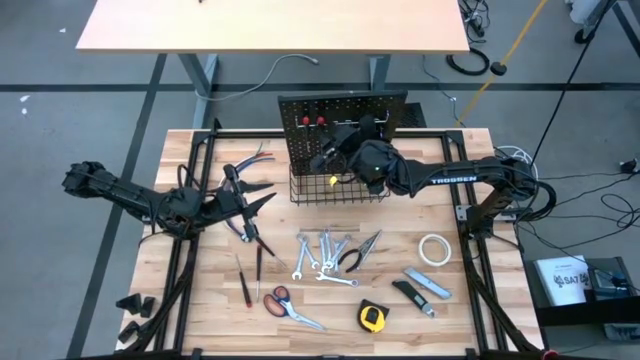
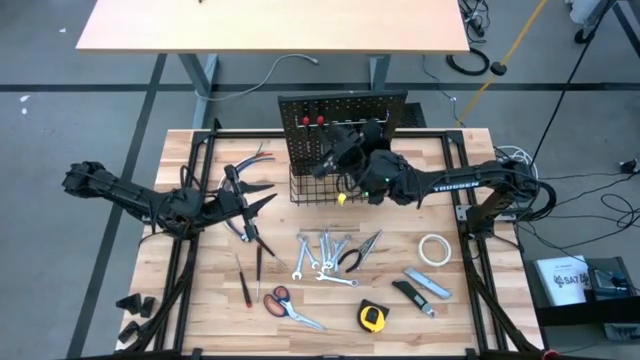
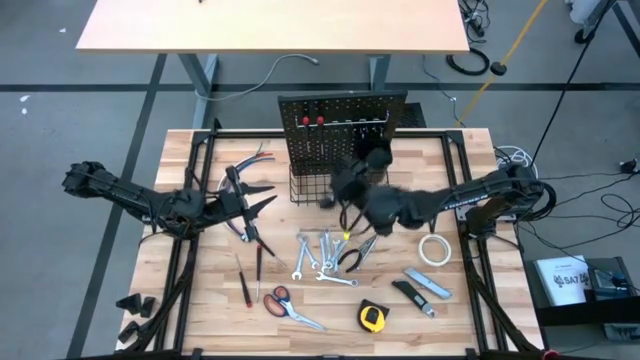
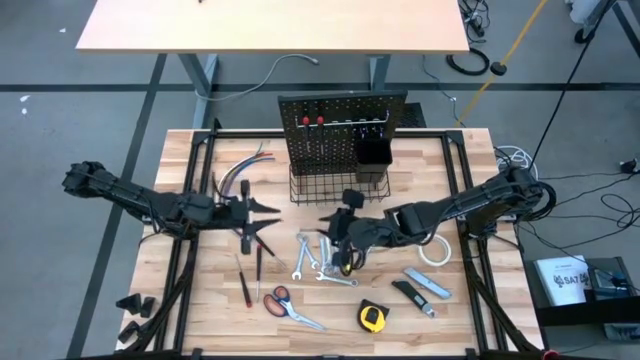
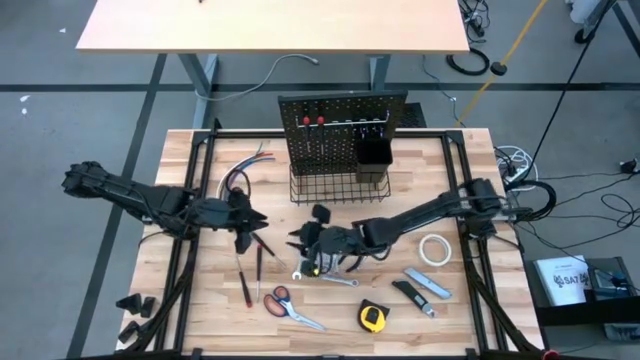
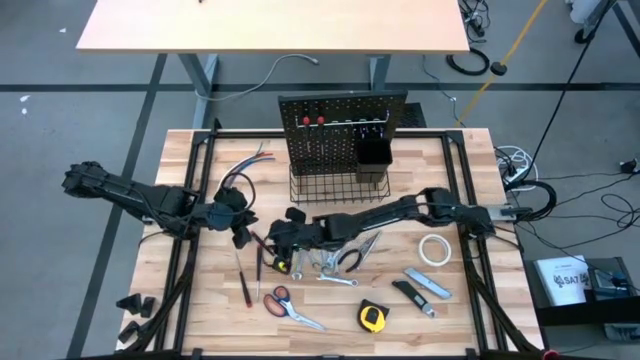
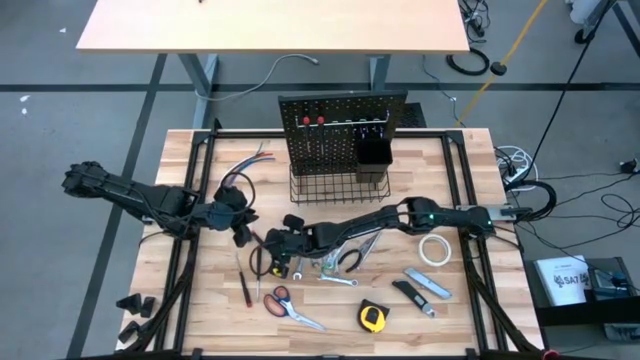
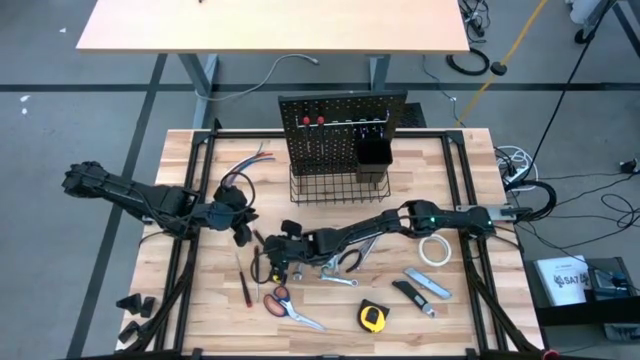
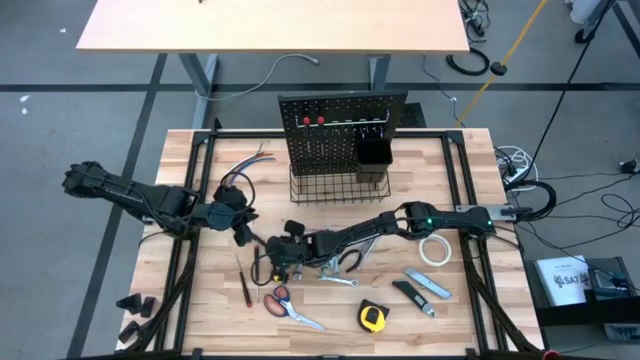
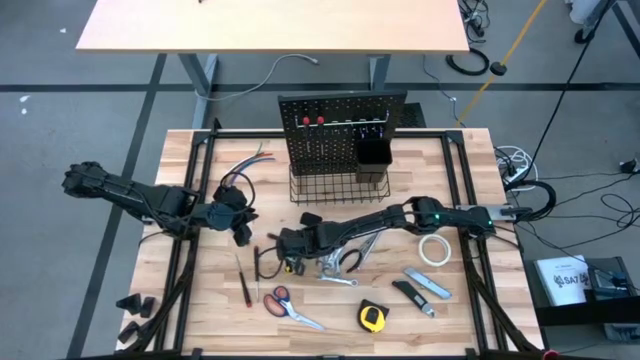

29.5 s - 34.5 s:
Task: Hang tools onto peg board
Hang the nut driver on the pegboard

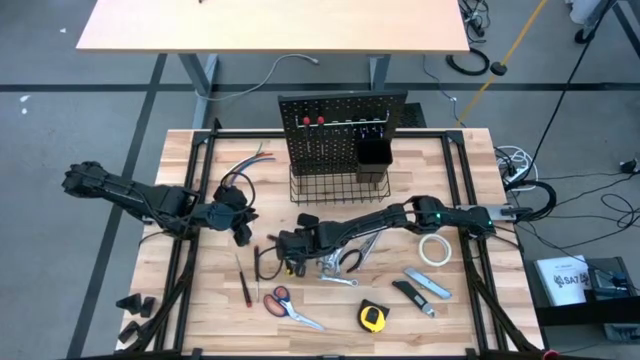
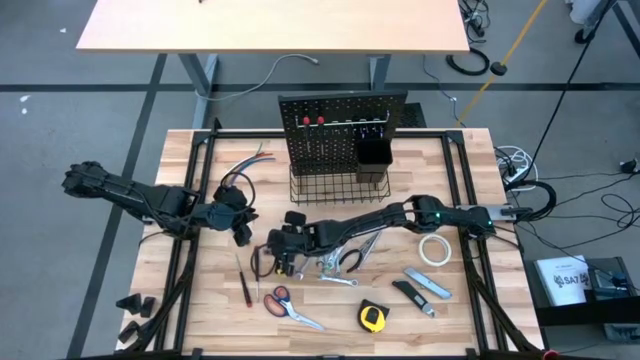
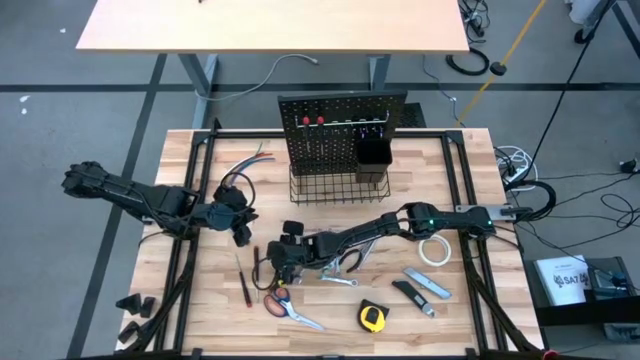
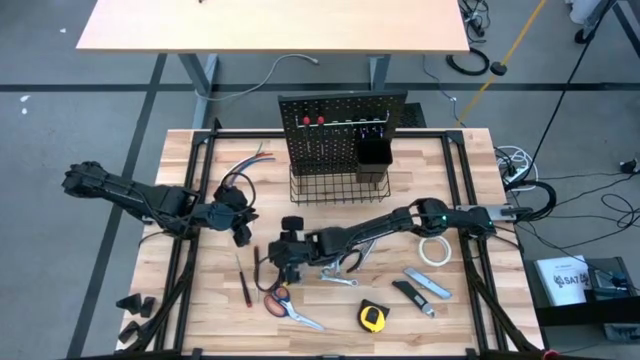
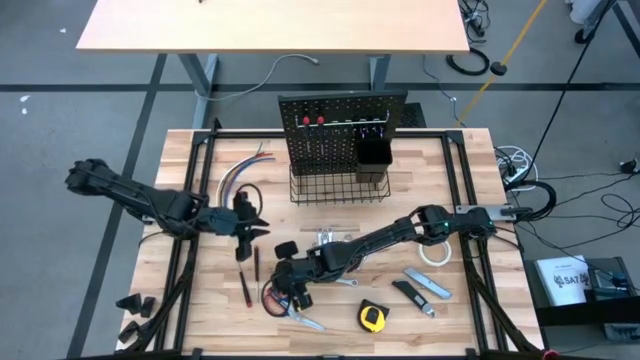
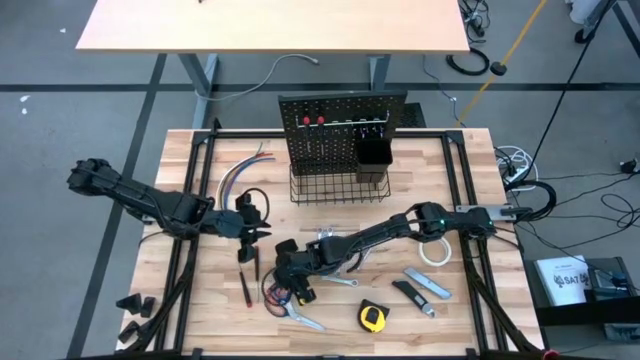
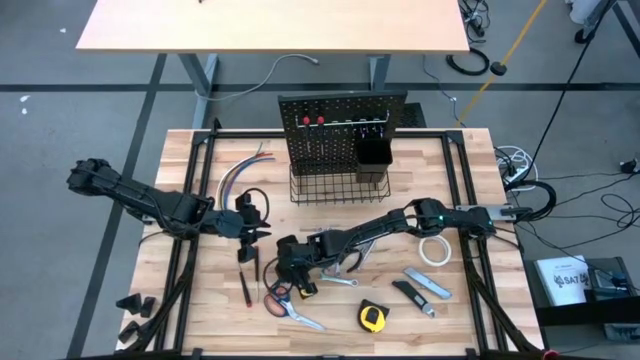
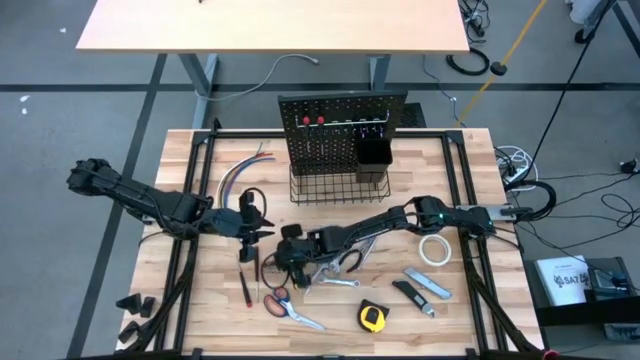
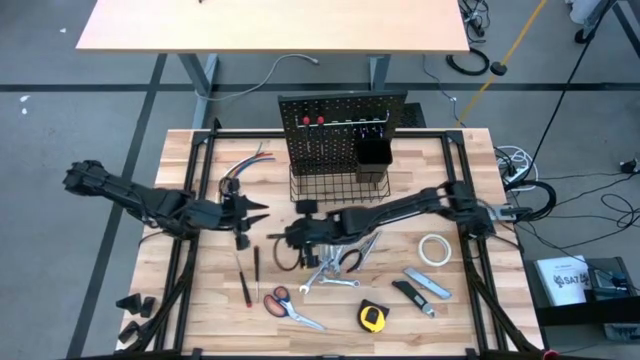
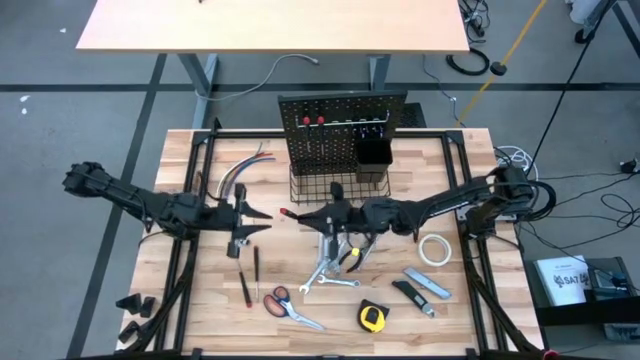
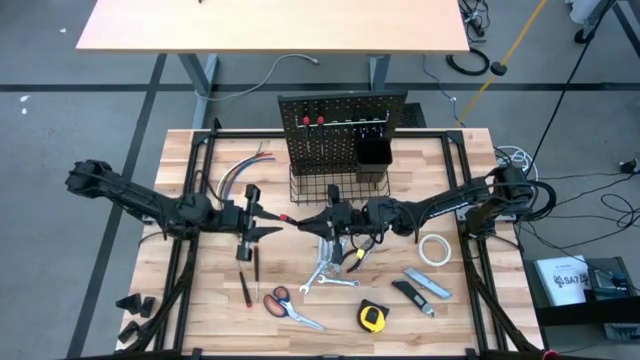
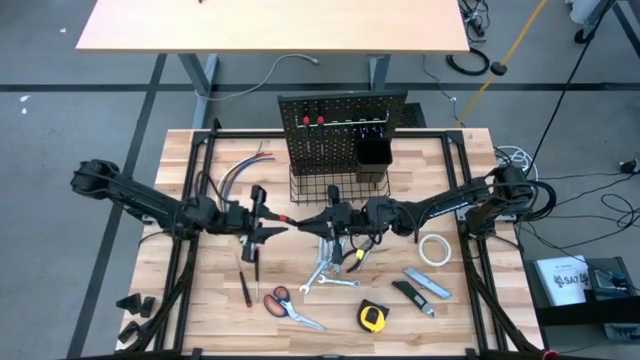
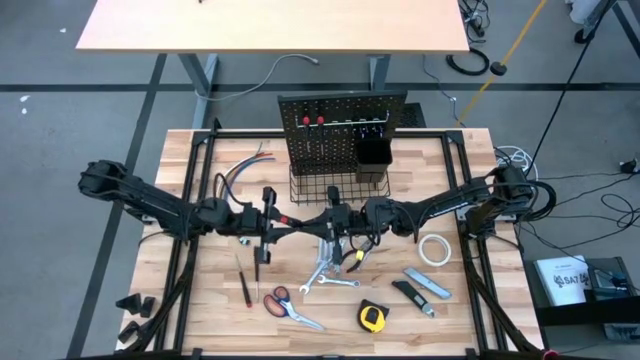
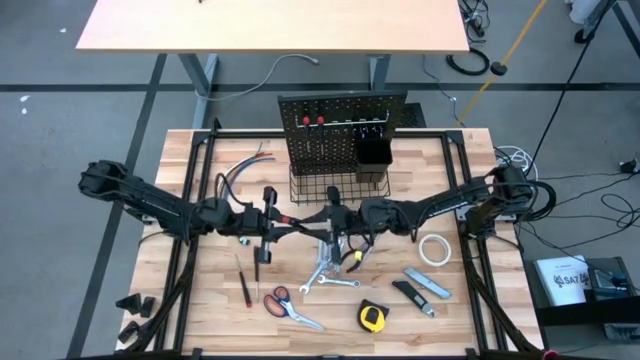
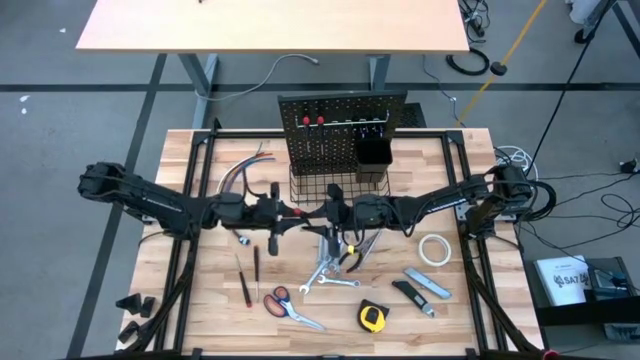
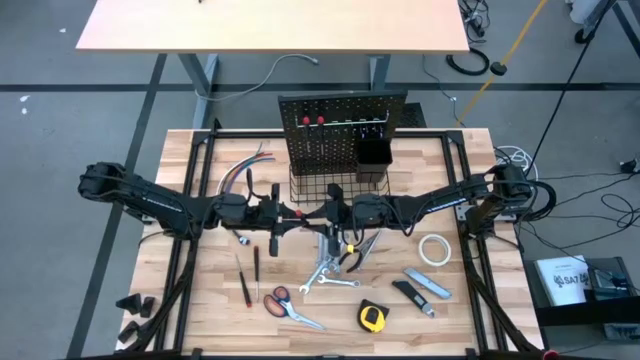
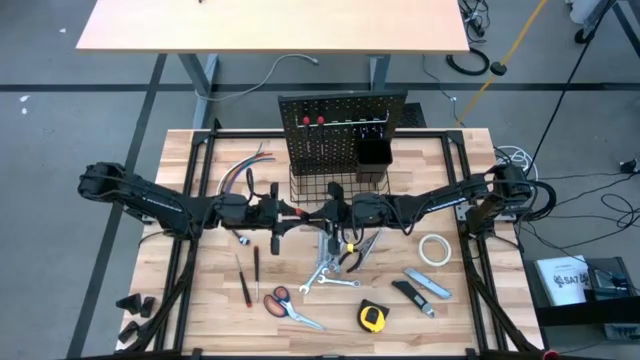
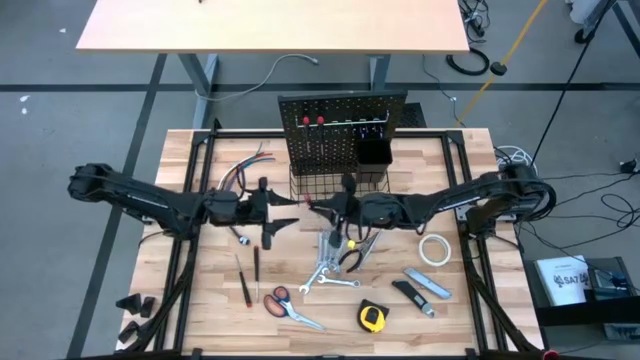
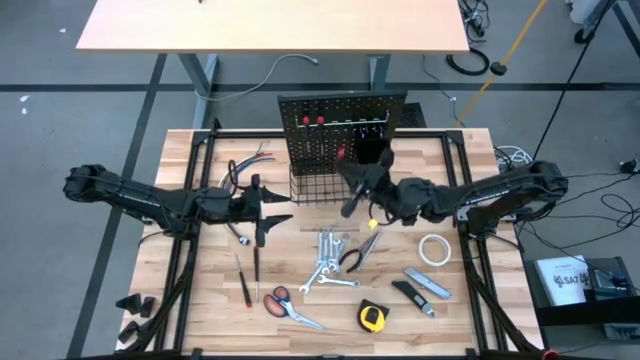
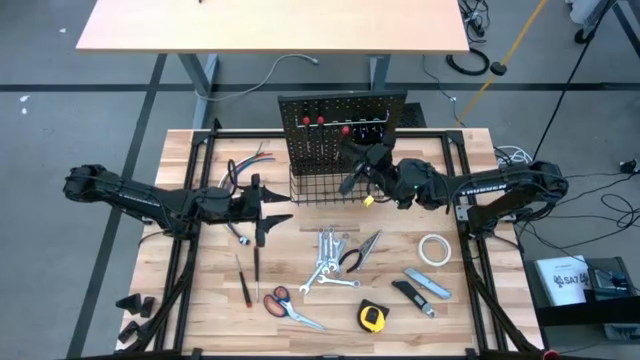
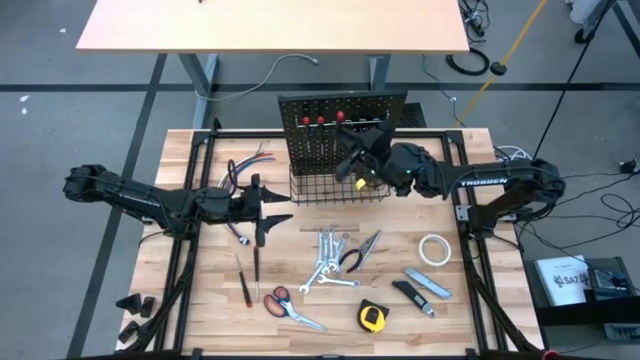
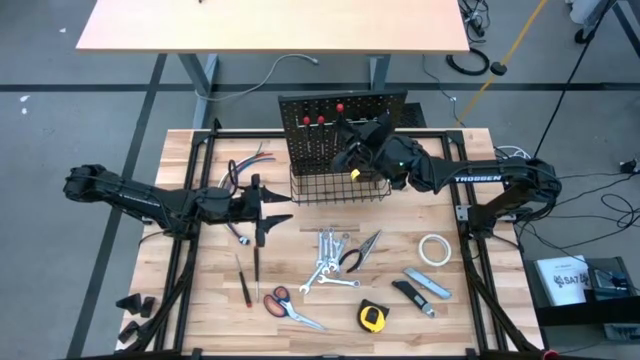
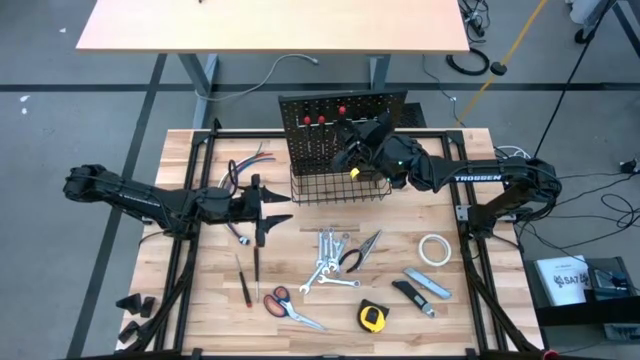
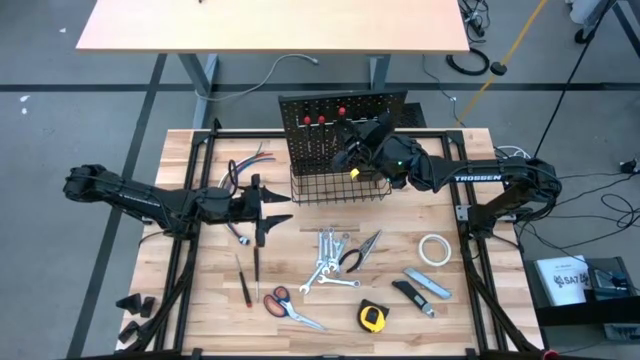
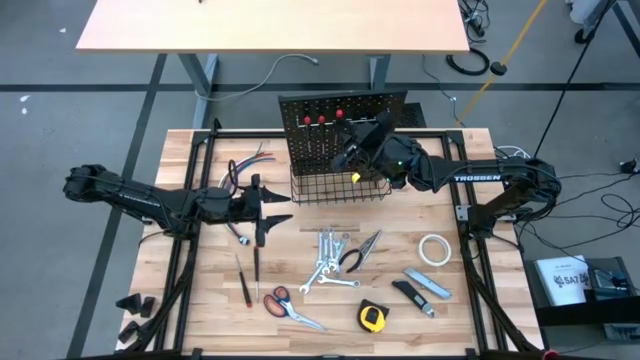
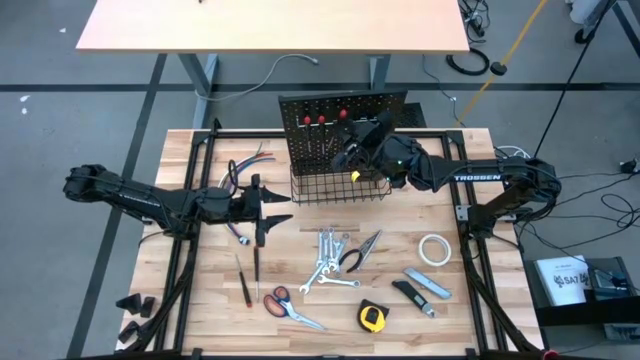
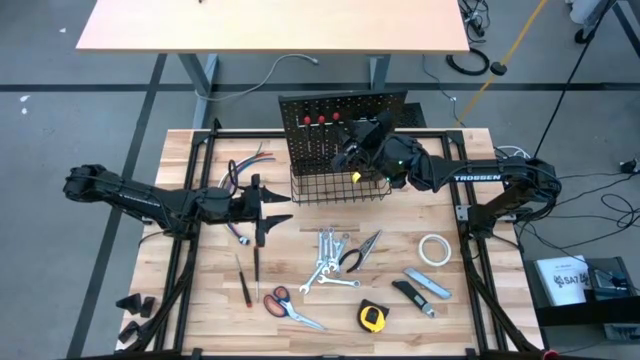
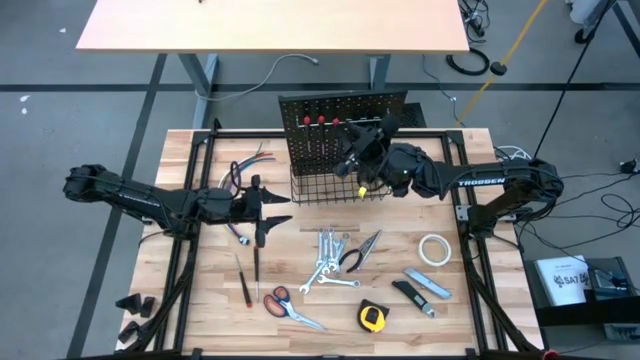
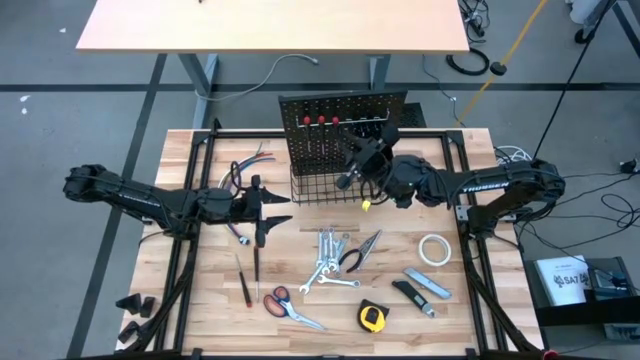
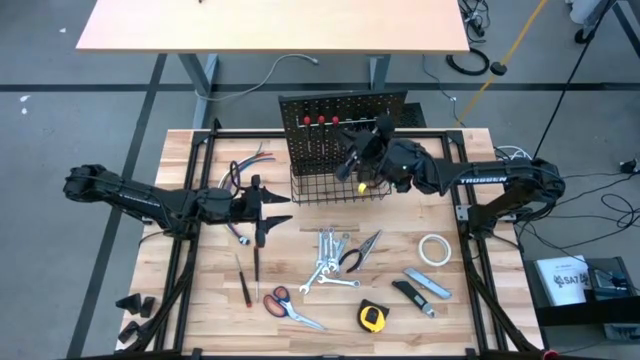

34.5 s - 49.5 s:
Hang the nut driver on the pegboard

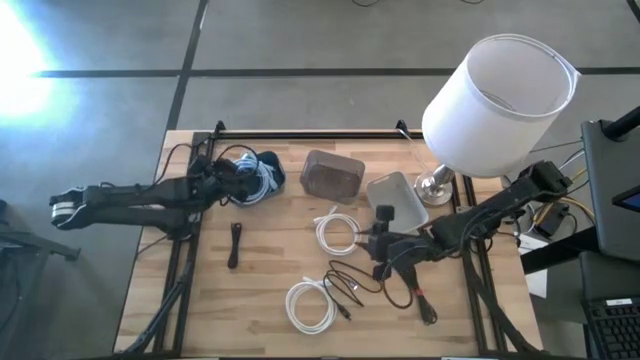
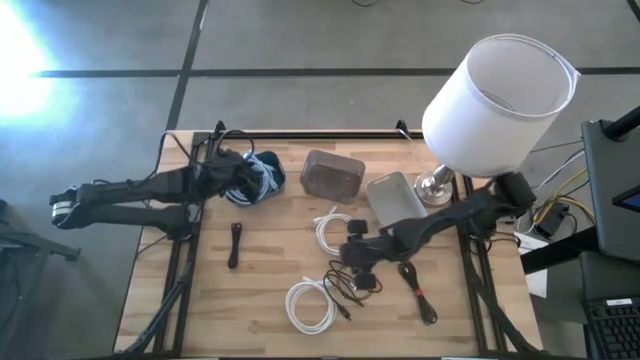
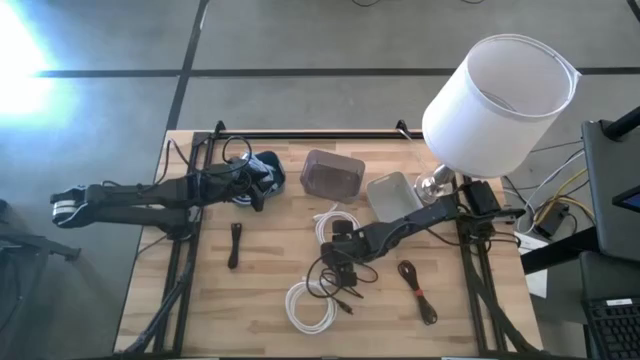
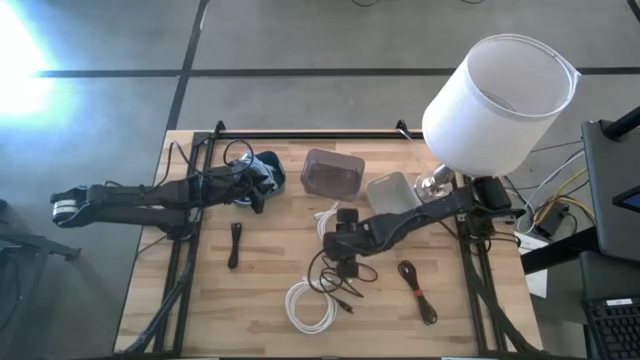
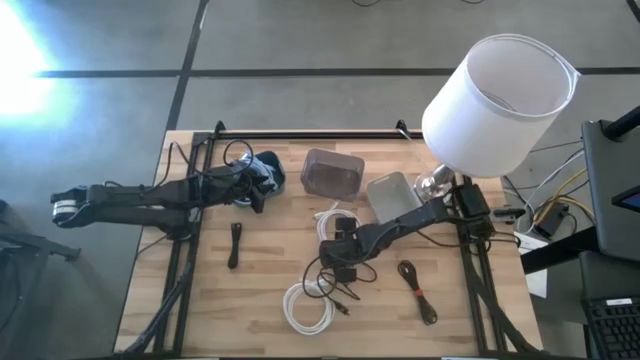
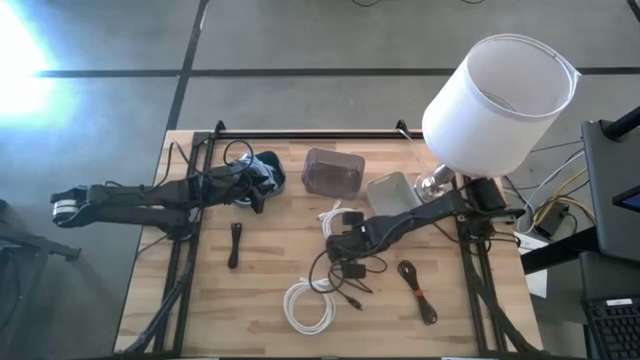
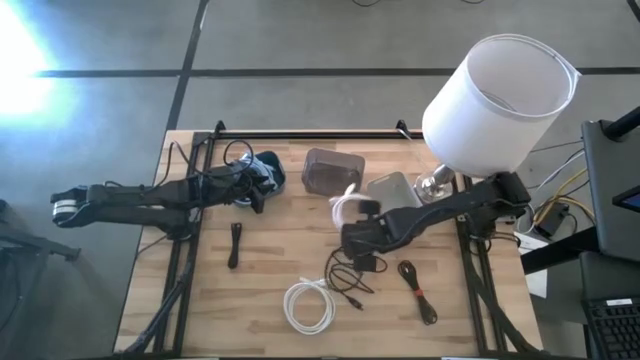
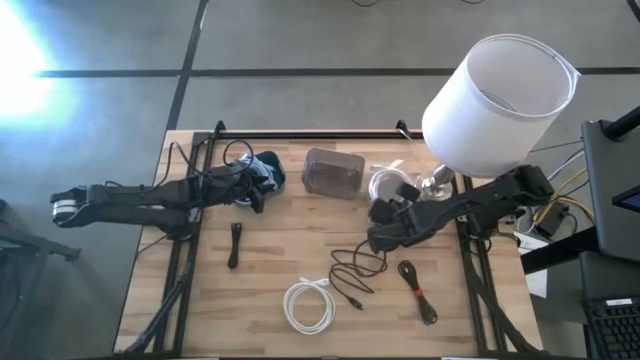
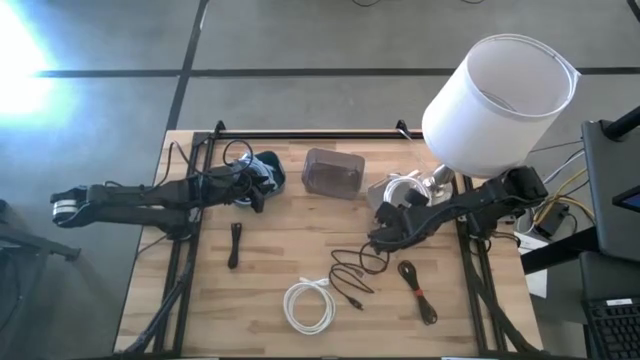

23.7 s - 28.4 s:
Task: Pick & Place USB Port
Put the top white HDMI cable into the gray bin
